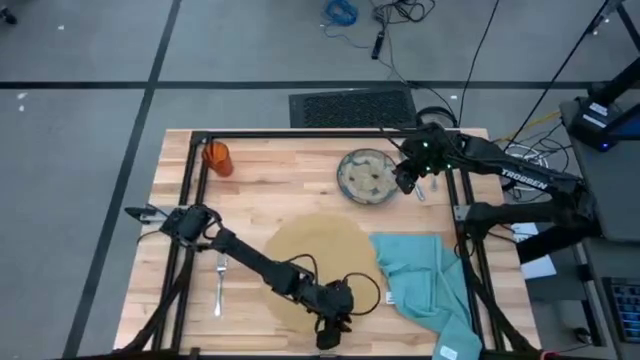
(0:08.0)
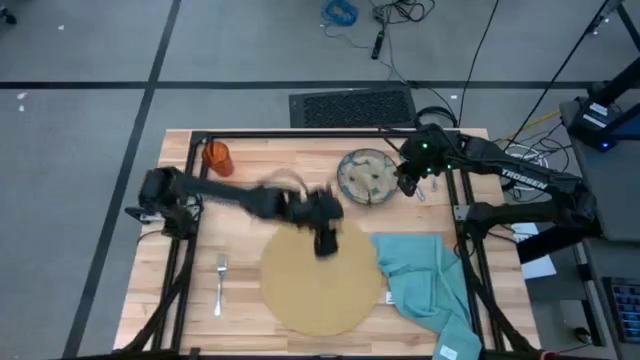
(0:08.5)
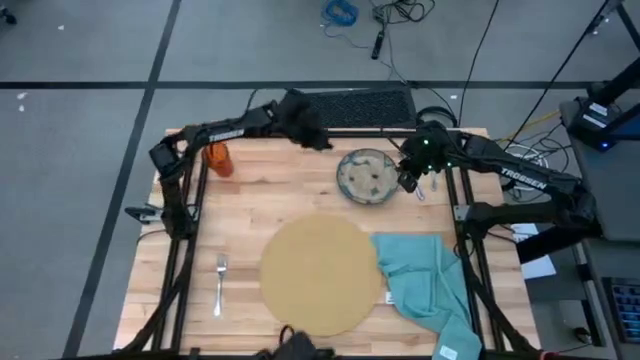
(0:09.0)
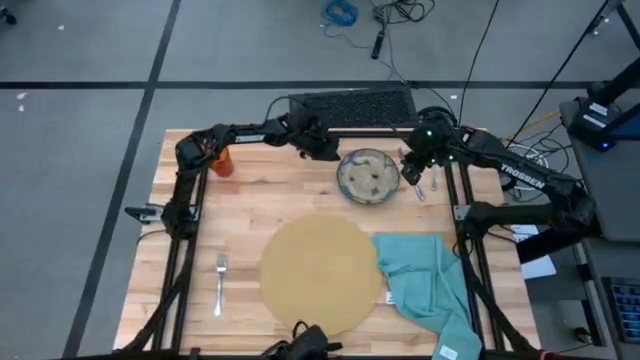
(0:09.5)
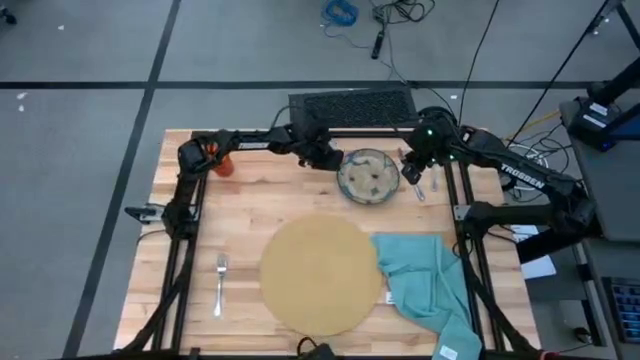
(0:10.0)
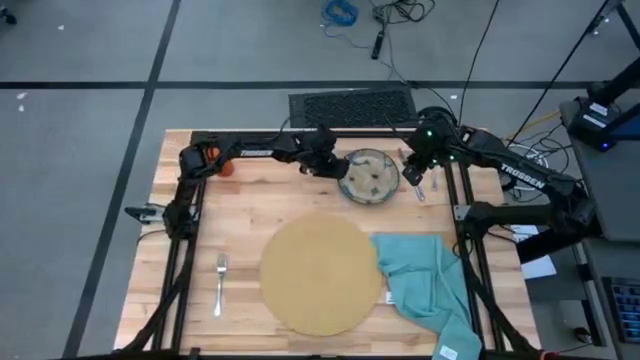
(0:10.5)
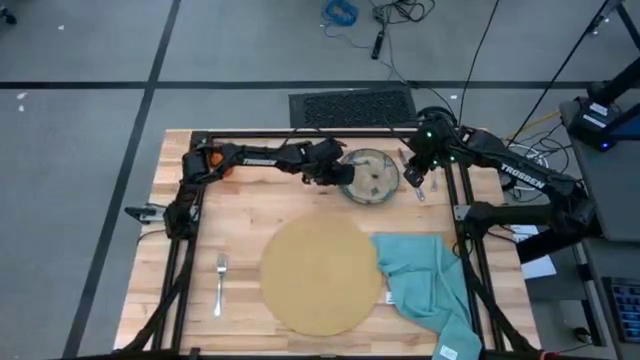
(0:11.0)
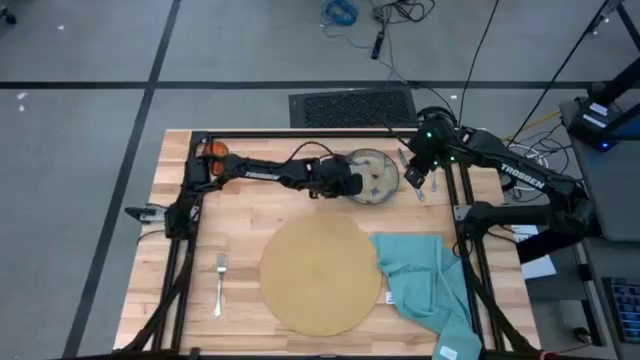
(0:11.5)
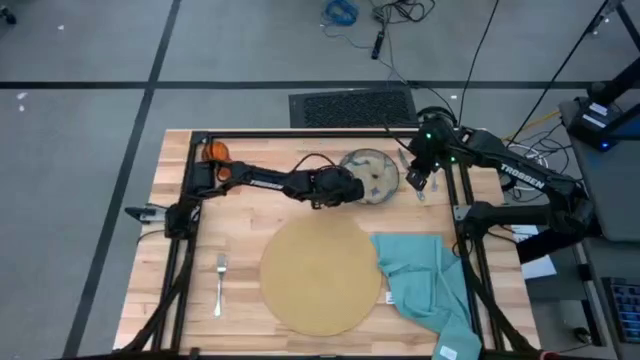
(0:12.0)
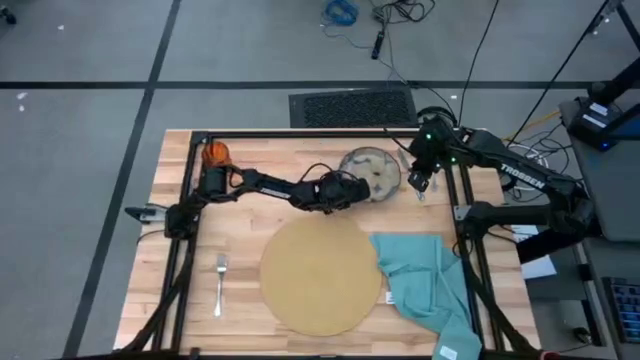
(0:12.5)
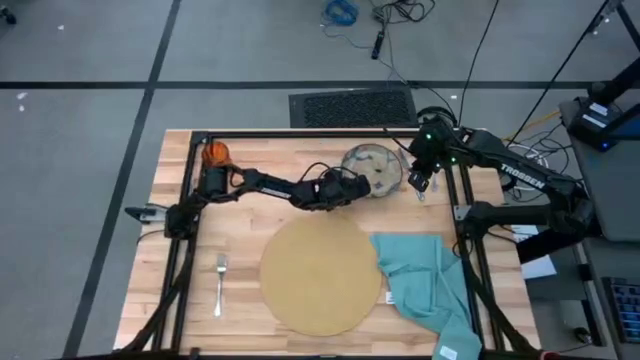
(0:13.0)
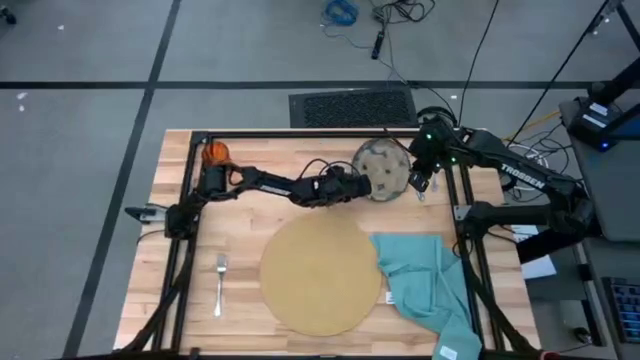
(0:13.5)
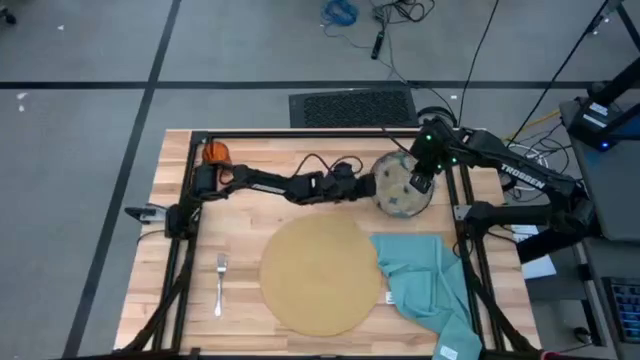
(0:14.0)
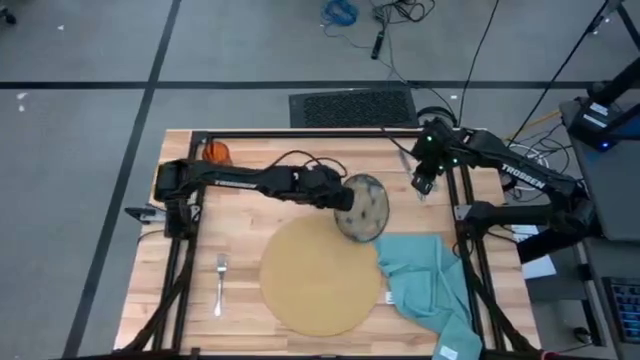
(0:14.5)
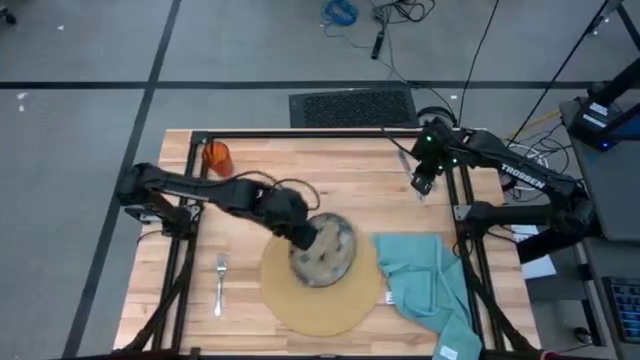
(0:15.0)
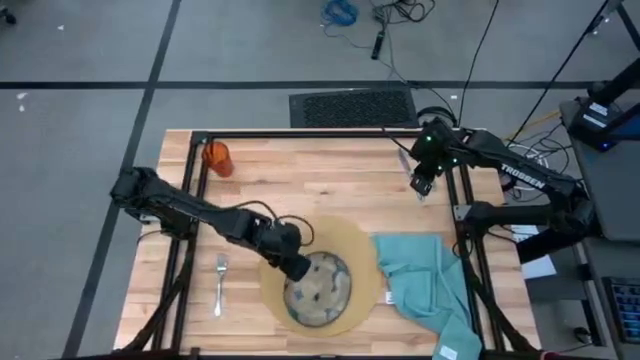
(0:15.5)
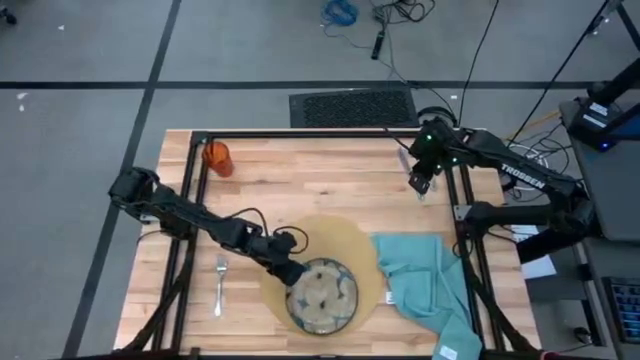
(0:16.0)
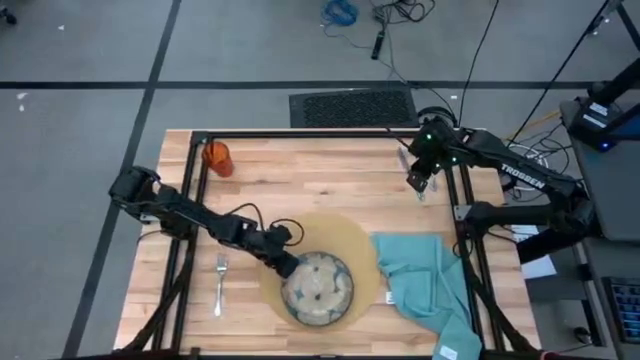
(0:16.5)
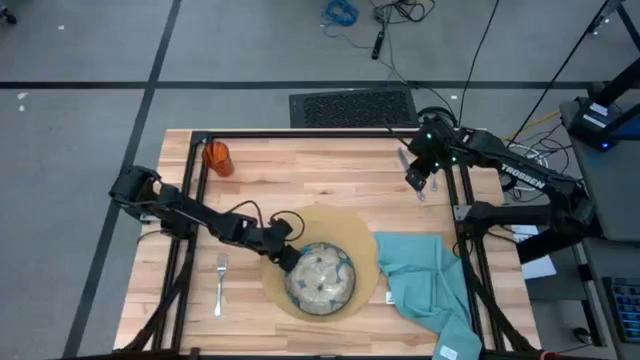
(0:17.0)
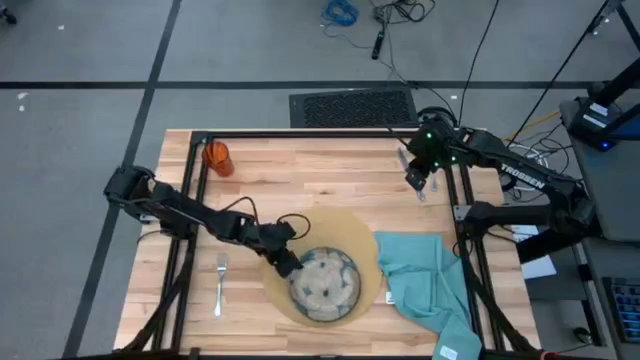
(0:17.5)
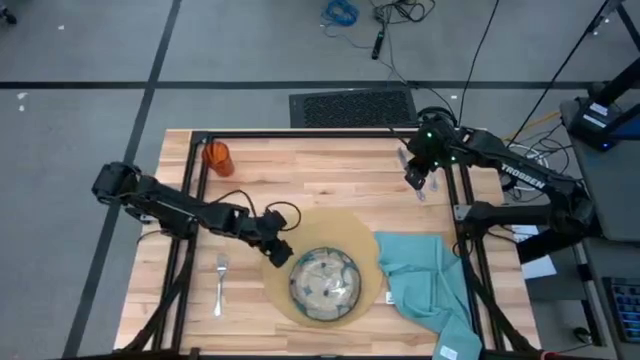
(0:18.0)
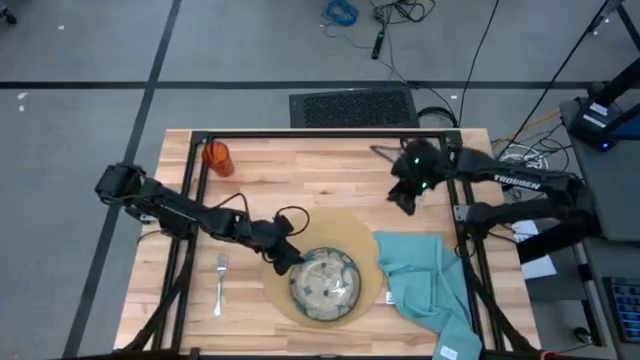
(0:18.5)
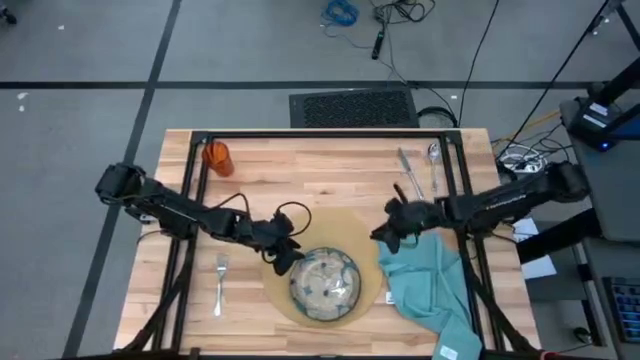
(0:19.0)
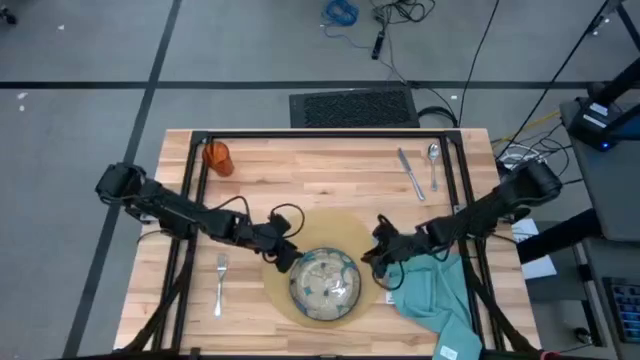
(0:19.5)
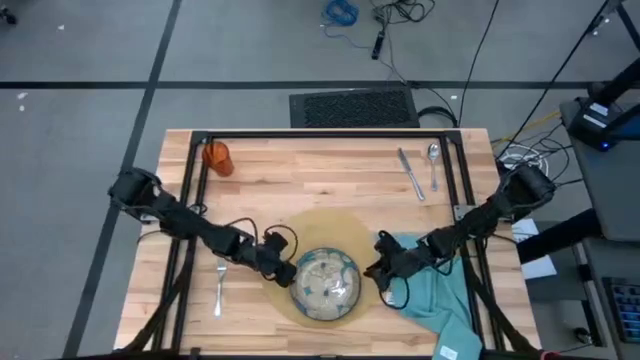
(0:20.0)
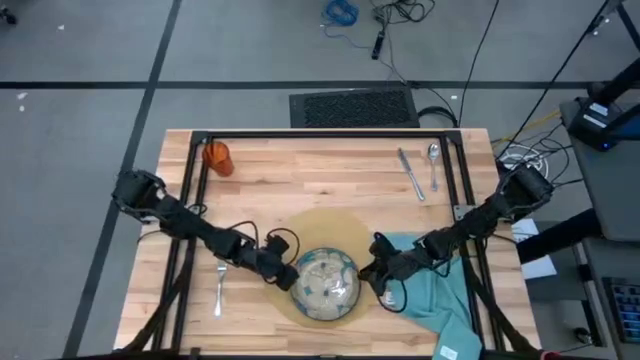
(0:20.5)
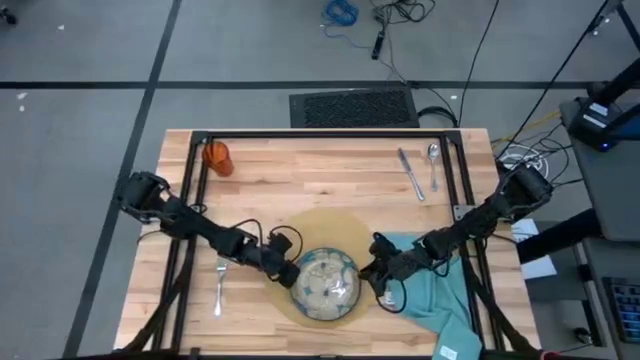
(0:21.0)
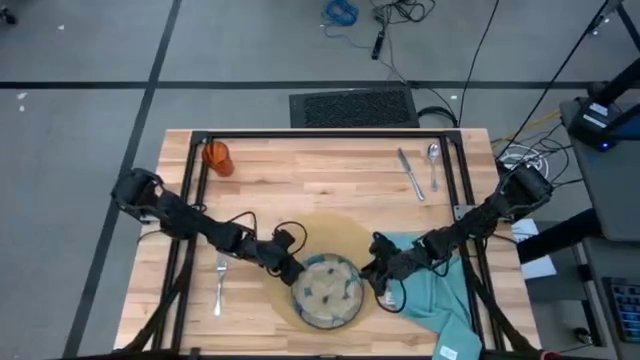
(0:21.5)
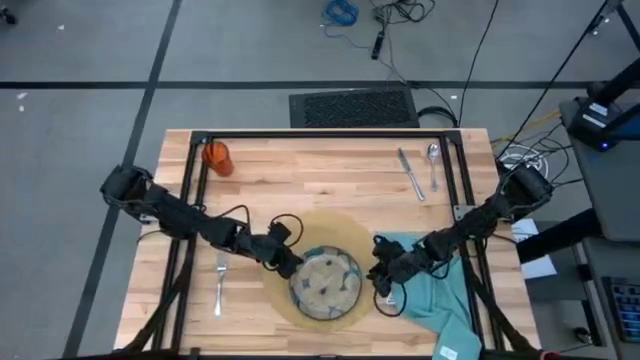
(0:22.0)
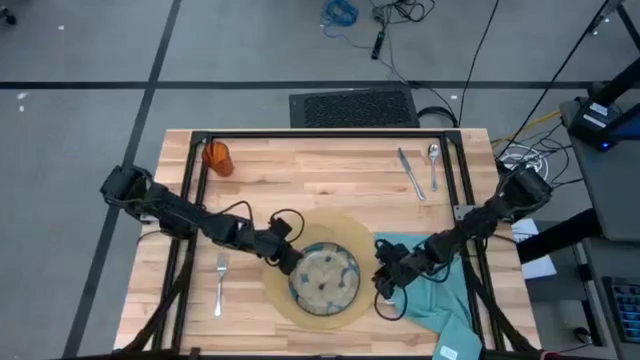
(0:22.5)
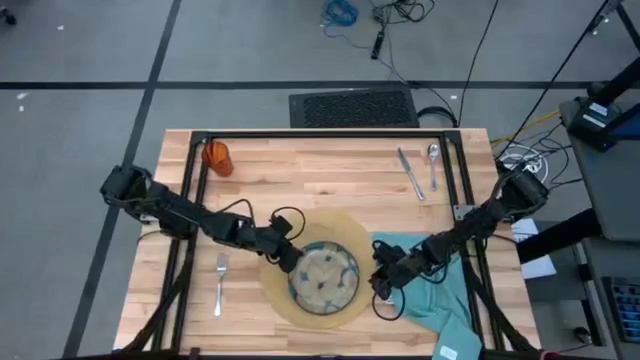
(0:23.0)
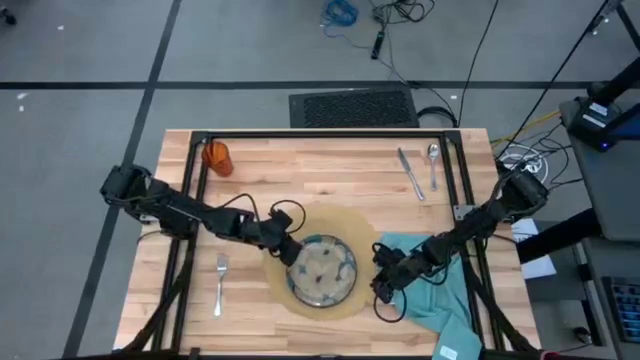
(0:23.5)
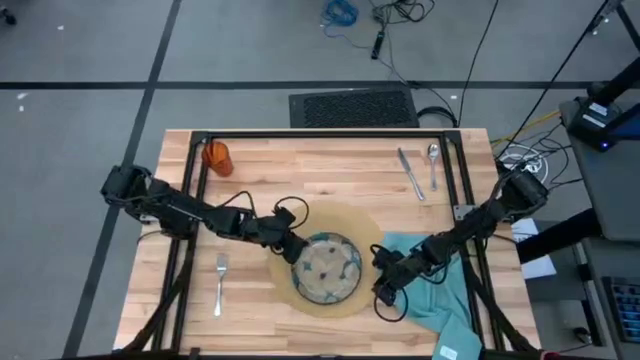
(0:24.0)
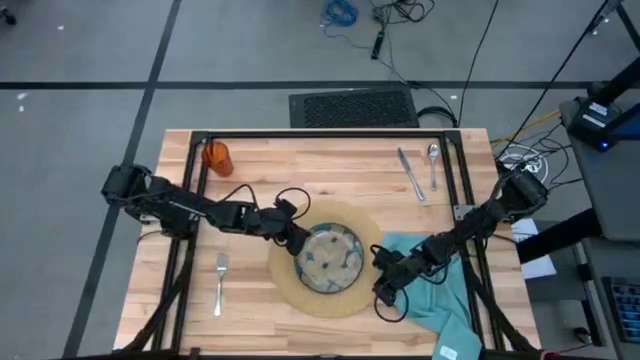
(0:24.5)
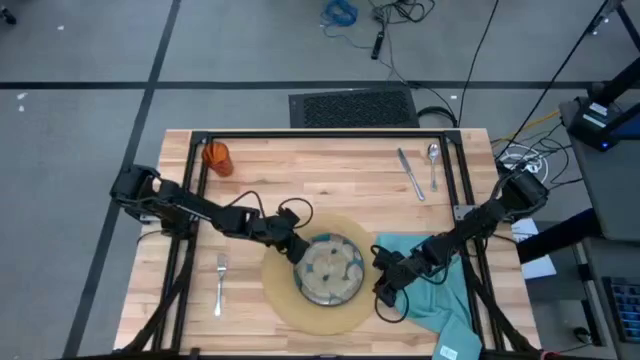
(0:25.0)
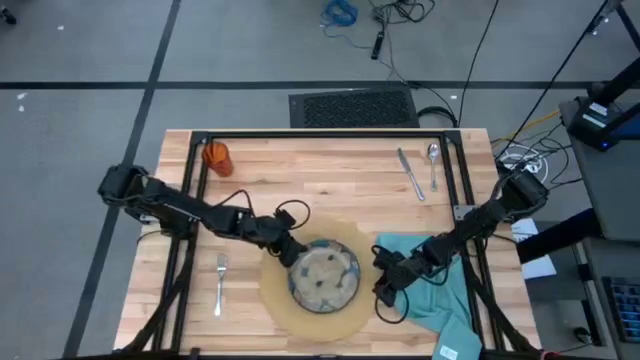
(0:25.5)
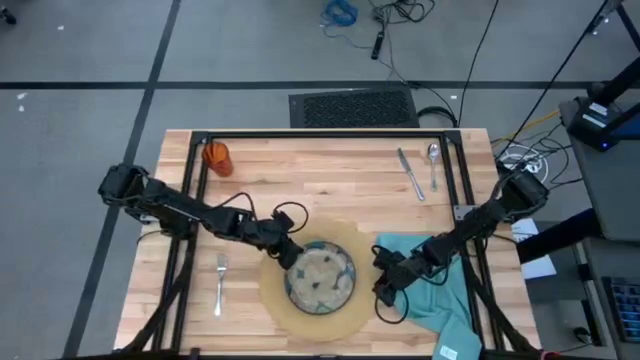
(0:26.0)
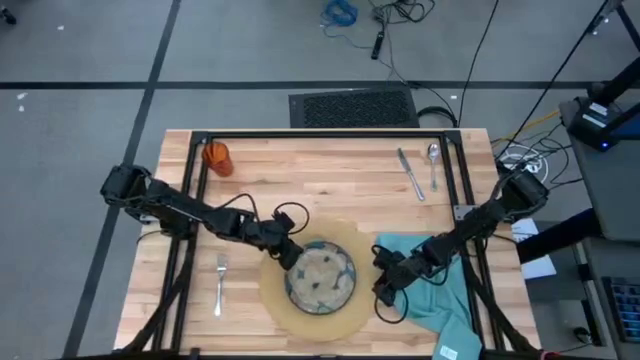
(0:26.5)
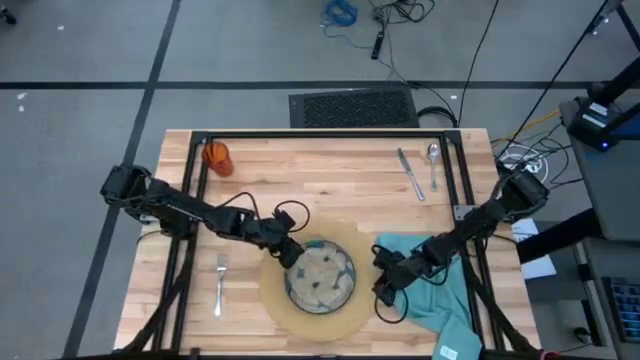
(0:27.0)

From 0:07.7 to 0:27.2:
Task: Set table place
Put the patterned plate on top of the brown mat
